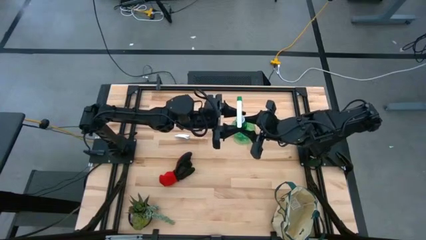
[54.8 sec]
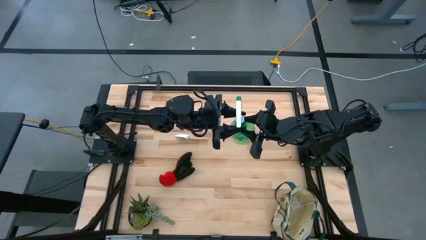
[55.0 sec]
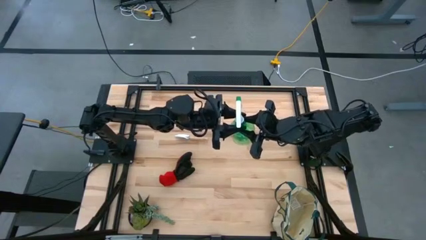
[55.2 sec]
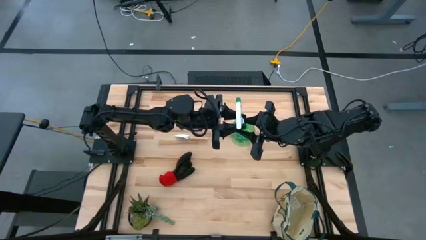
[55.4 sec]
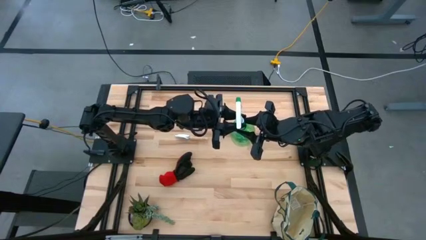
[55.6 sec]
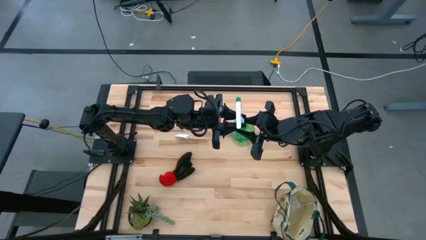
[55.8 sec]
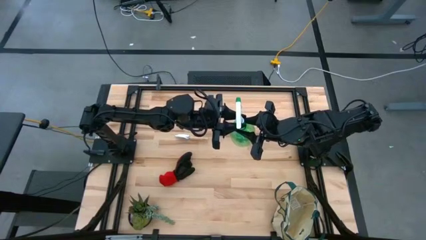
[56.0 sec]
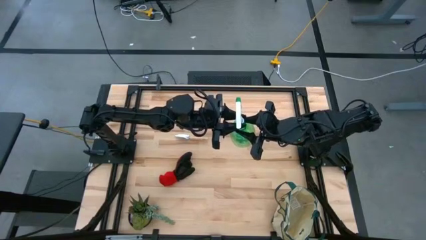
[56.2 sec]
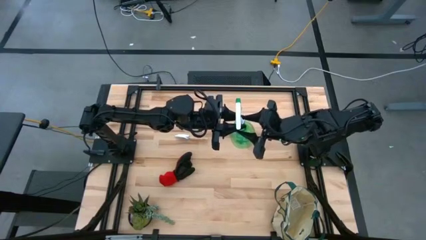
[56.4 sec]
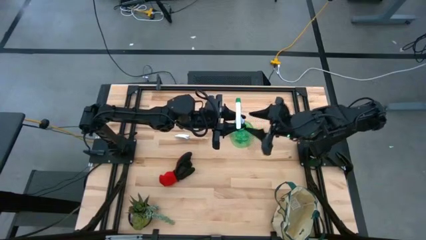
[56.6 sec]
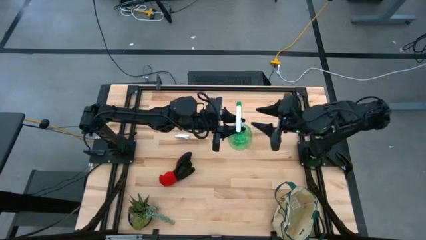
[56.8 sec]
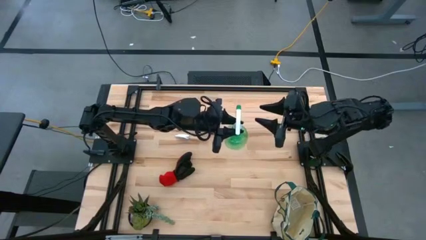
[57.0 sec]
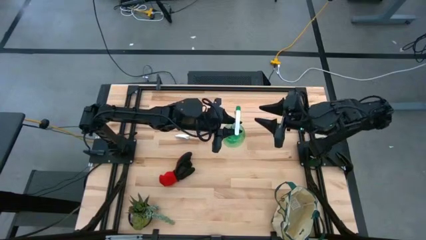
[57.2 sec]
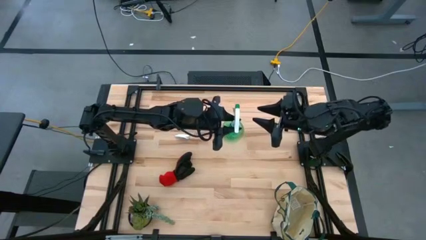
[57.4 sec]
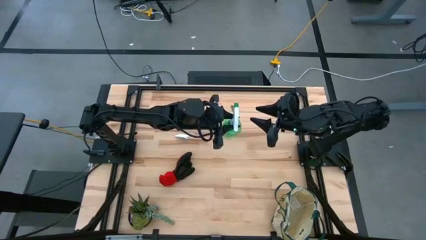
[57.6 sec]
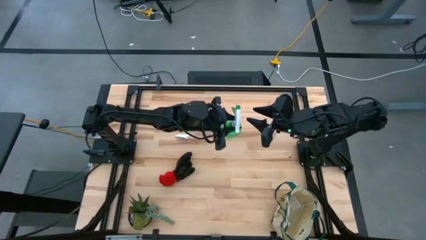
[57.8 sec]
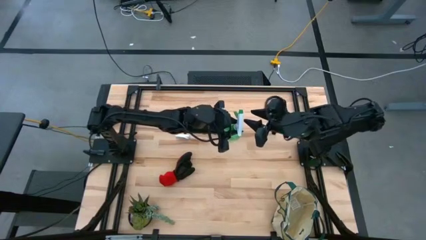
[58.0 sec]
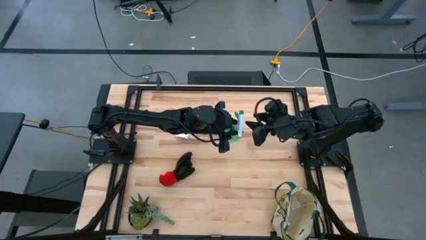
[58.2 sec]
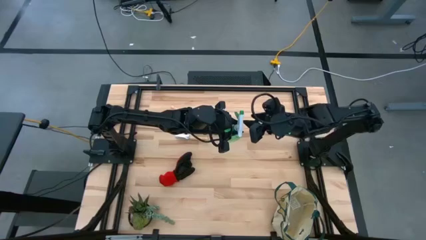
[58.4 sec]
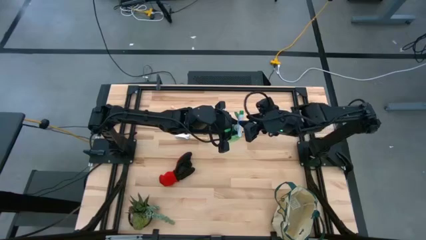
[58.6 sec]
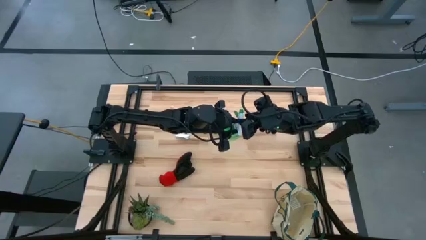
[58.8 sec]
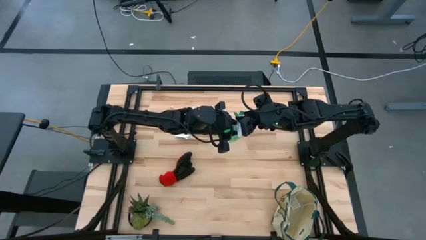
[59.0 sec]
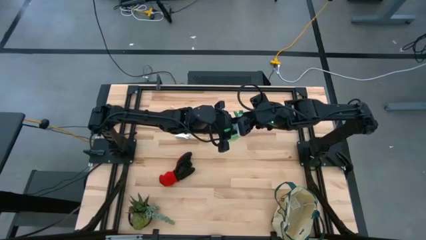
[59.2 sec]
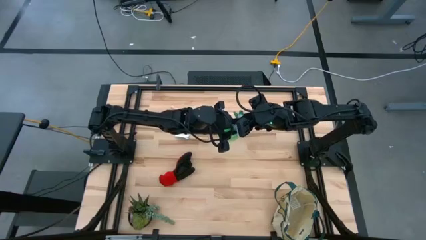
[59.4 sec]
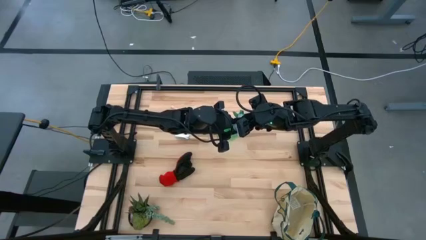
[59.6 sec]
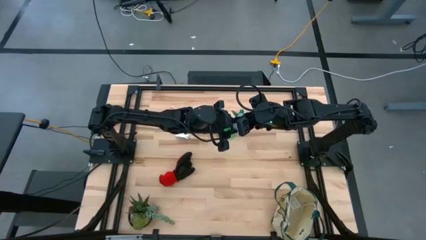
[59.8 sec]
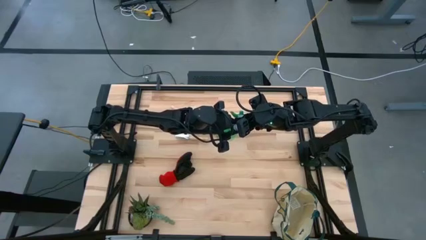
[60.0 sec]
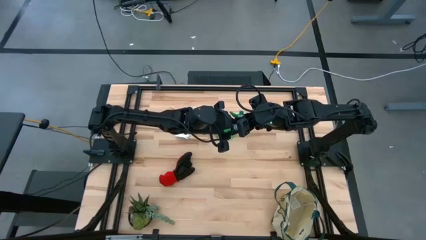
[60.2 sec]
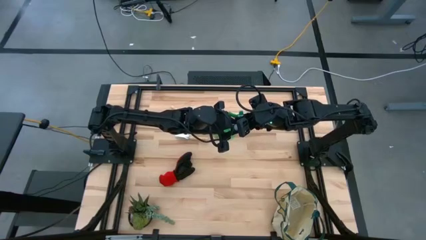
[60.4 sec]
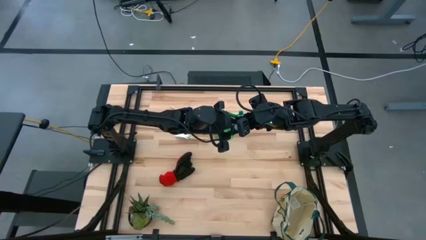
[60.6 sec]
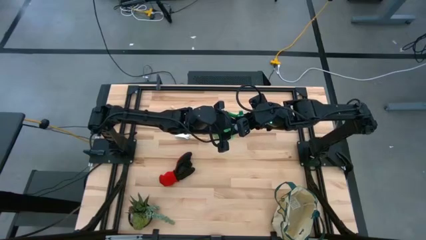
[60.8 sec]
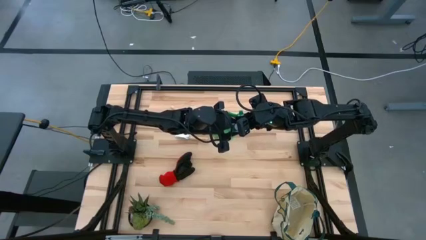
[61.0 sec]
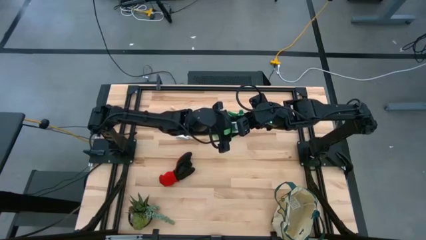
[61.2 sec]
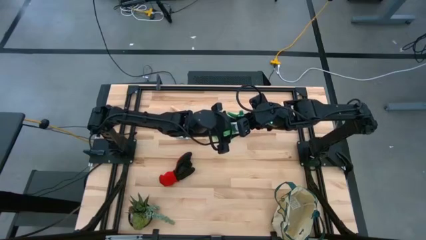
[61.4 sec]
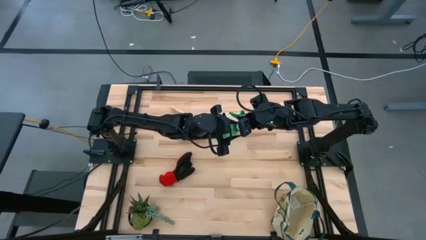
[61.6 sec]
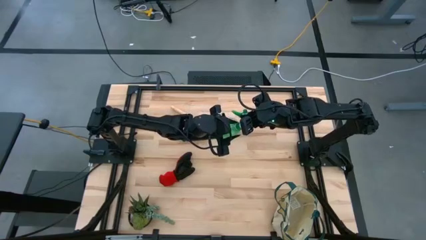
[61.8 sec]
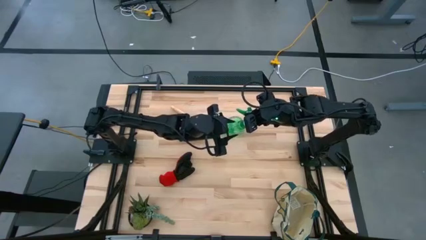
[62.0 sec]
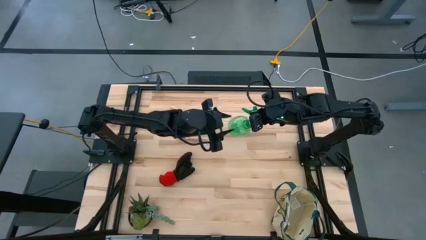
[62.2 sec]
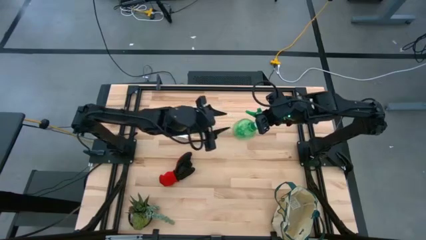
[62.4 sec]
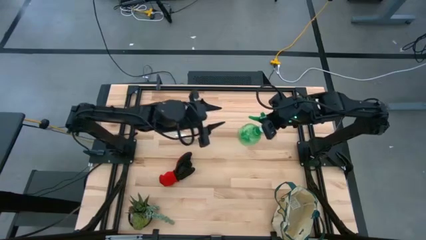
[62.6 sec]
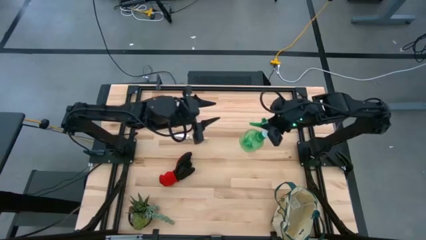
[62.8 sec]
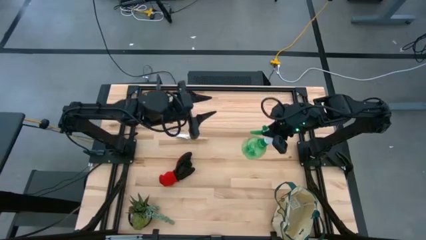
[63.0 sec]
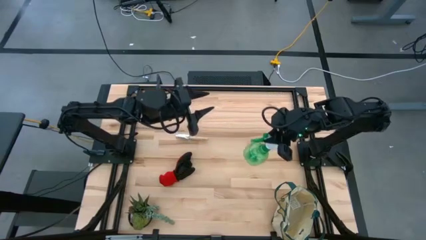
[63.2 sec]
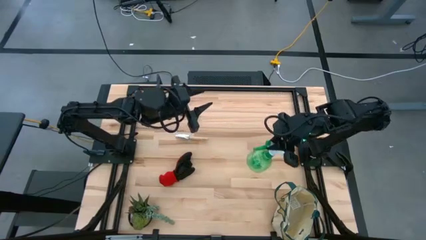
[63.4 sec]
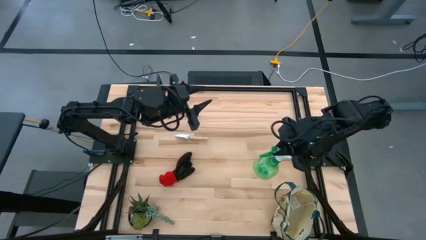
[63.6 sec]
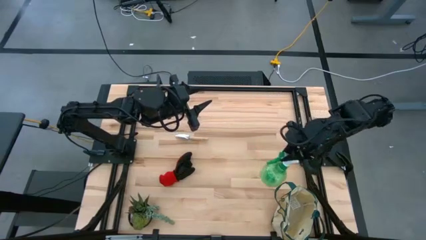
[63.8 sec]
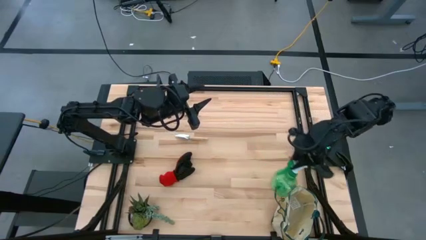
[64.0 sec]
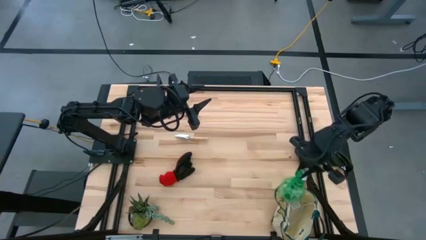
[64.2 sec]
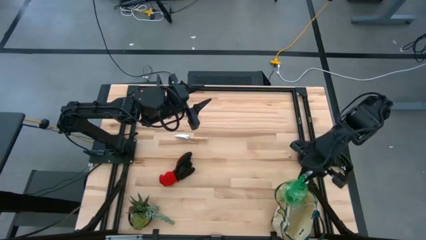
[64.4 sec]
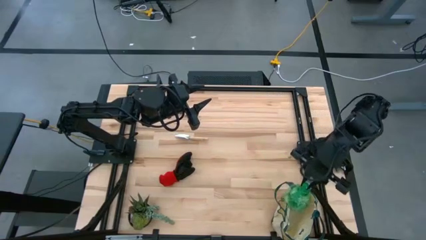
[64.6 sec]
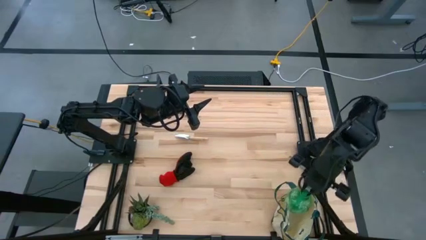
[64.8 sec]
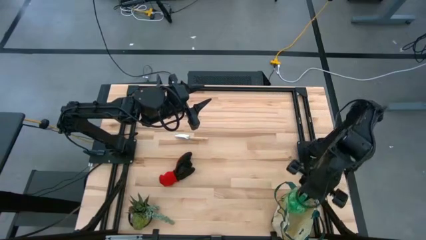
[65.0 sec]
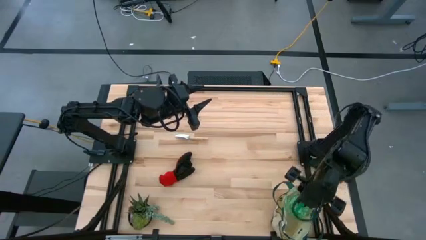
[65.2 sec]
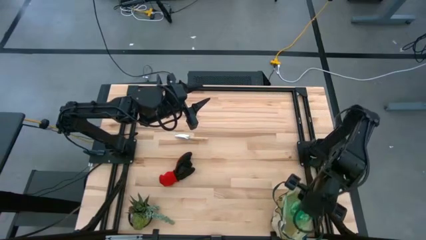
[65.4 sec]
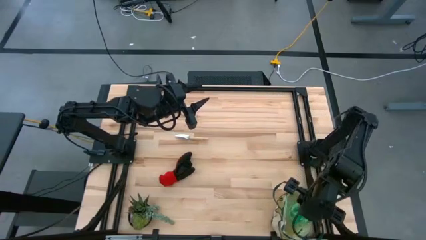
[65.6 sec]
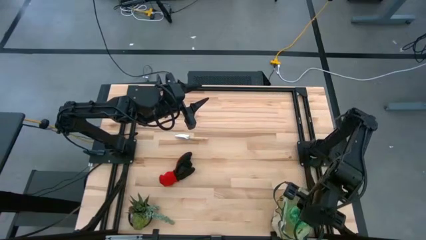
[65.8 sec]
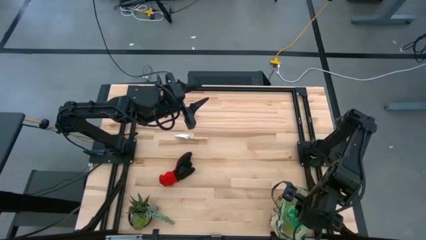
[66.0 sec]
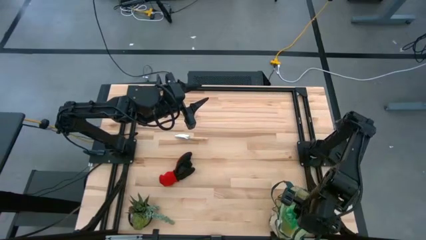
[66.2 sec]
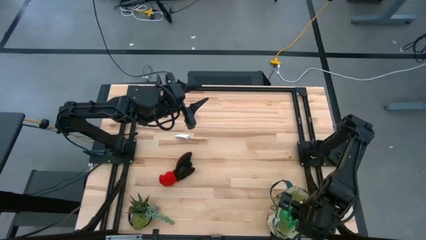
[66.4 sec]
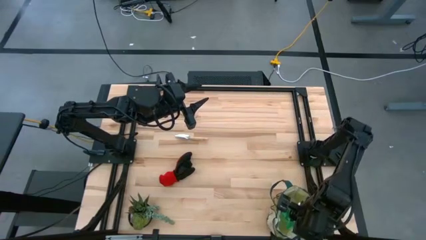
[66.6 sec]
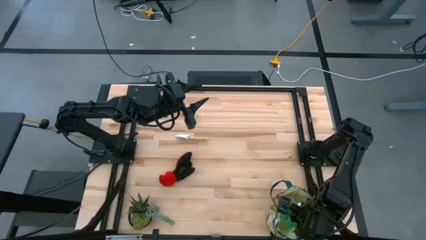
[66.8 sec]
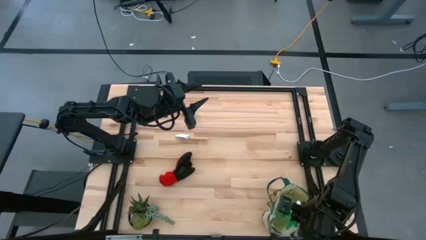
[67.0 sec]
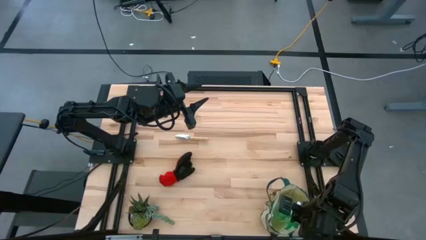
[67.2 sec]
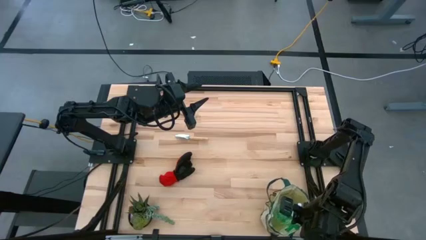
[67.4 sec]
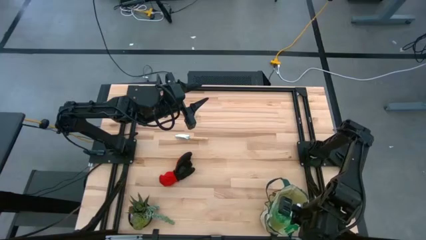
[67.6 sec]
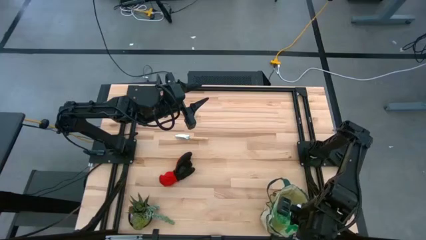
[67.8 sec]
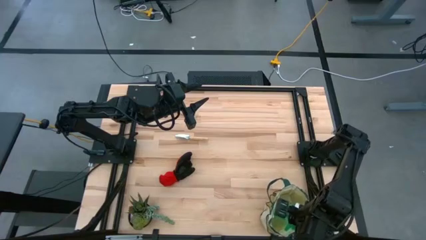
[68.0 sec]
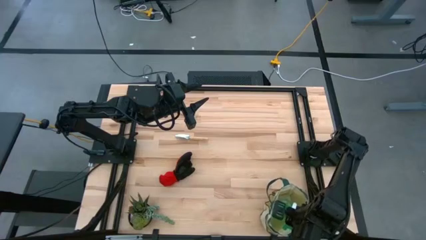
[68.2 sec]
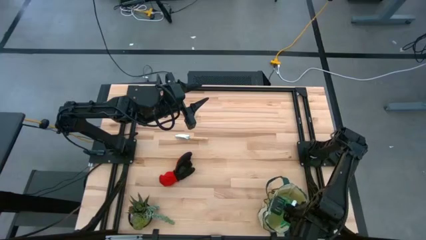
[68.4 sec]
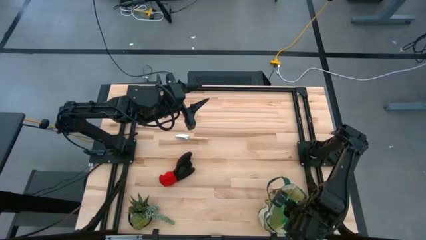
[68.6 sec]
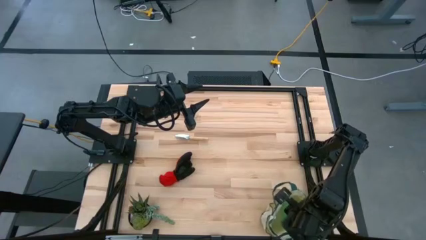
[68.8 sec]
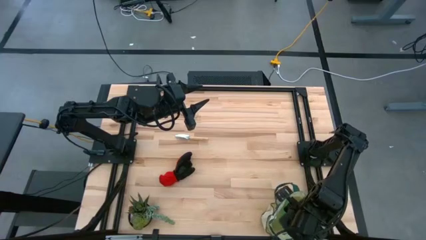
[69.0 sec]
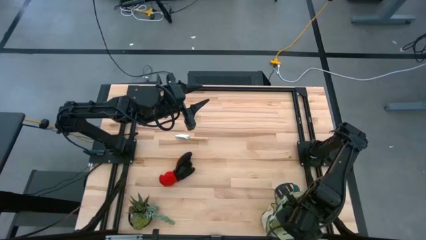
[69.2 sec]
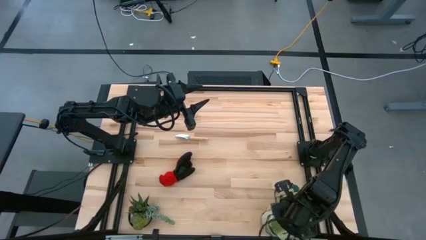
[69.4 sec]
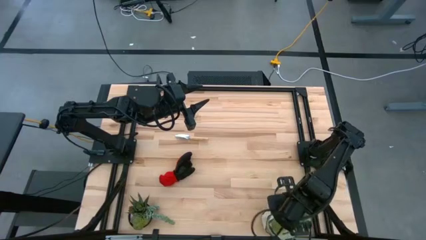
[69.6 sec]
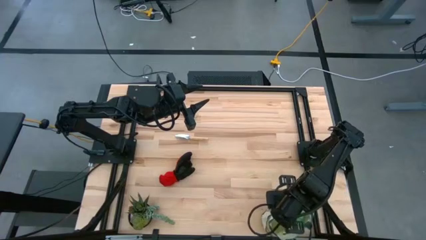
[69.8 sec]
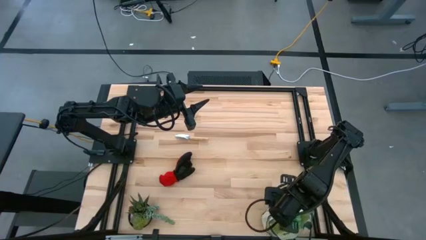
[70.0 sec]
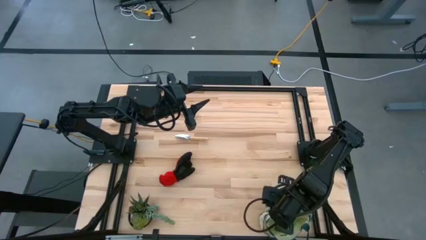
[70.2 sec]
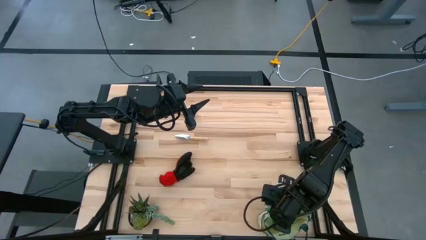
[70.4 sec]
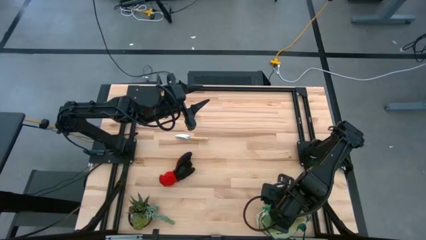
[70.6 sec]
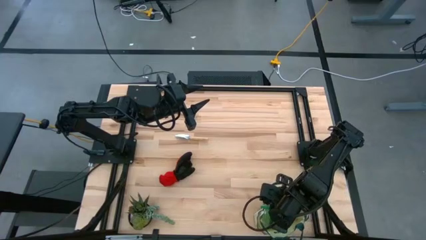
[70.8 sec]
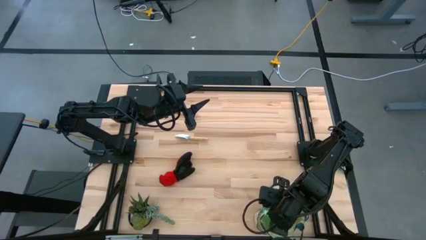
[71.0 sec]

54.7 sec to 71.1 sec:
Task: Pick & Place Garden tools in Gardening bag
Put the green spray bottle into the gardening bag

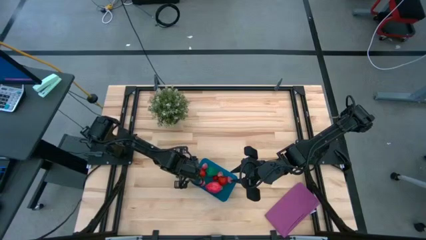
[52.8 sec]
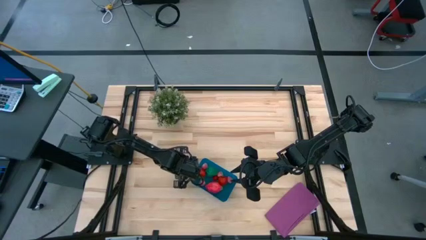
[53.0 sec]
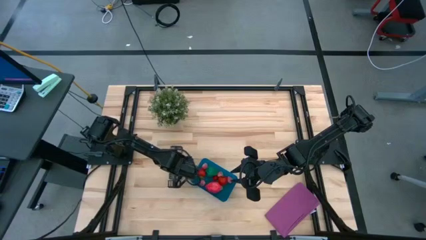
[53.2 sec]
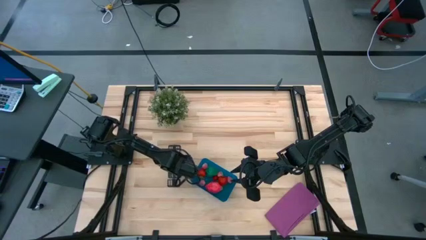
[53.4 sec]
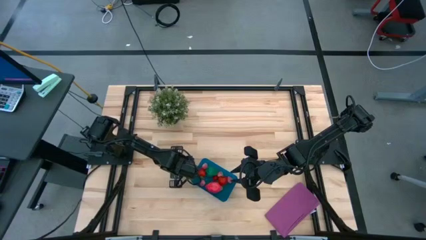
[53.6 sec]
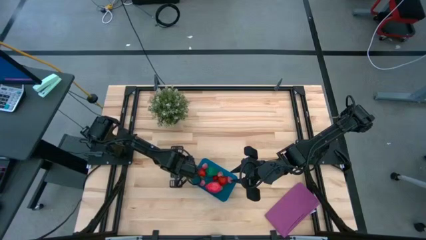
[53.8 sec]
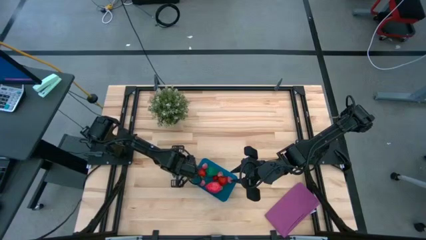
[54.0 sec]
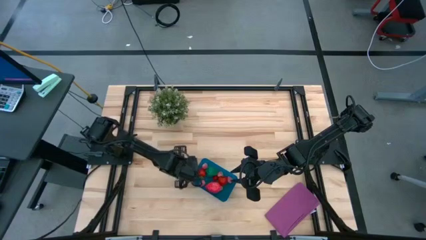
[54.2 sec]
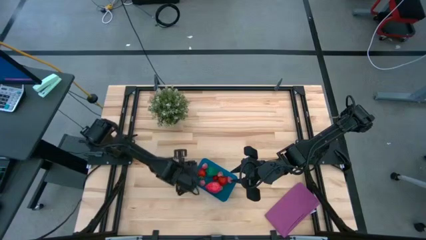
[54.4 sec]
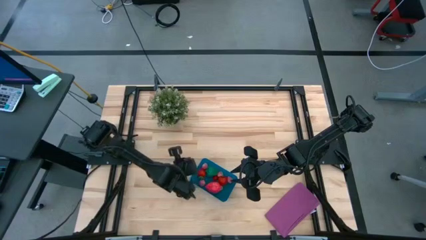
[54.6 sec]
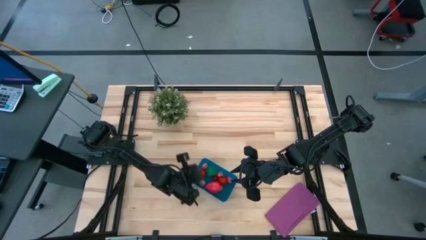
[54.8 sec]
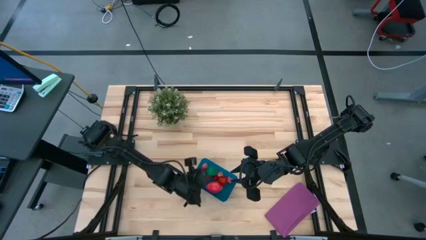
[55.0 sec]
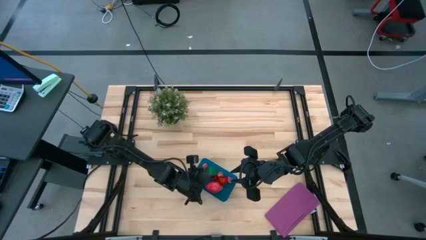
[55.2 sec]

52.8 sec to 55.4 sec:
Task: Pick and placing Produce into tupperware
Put the red cherry into the blue bin
